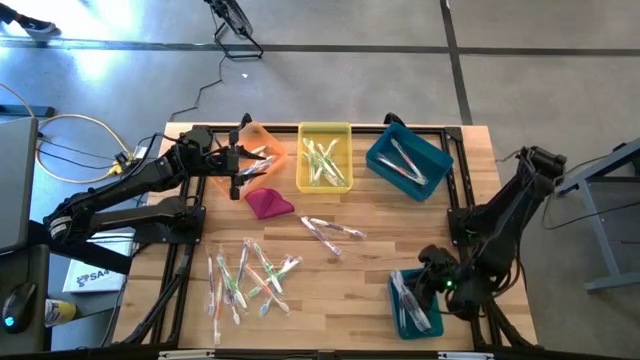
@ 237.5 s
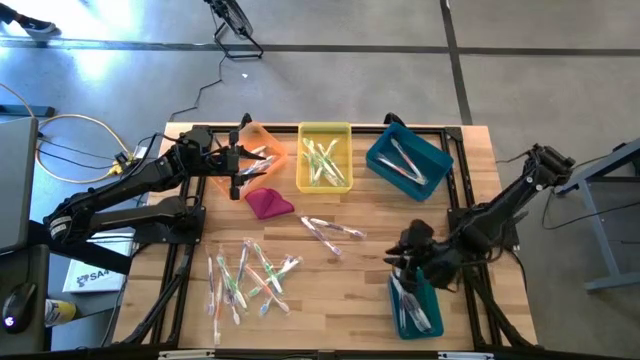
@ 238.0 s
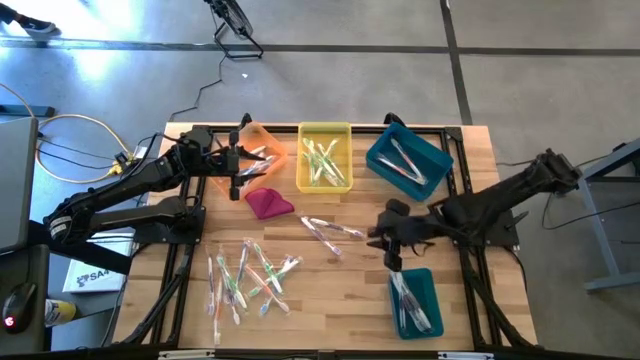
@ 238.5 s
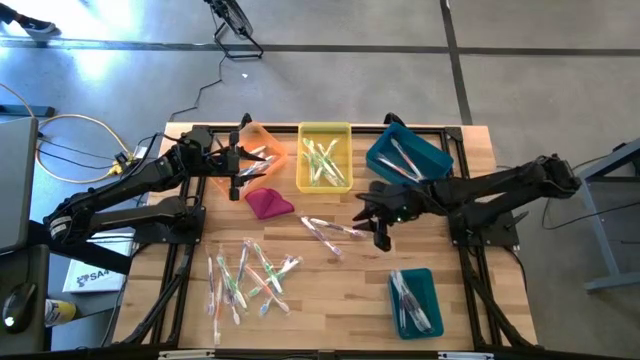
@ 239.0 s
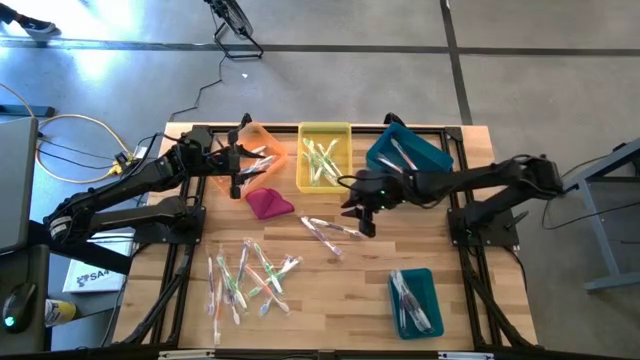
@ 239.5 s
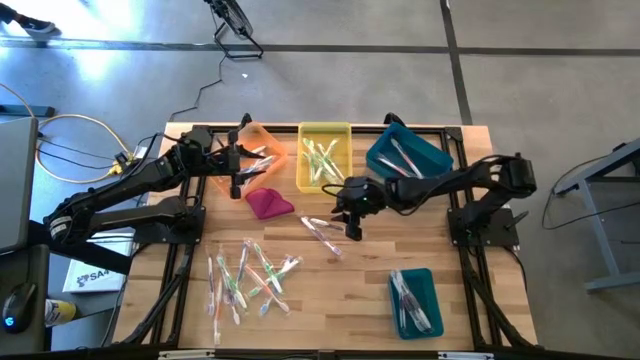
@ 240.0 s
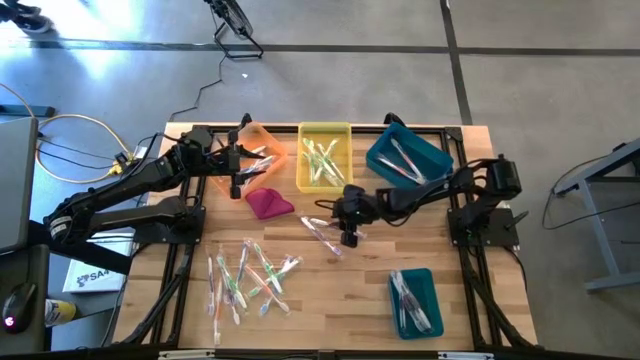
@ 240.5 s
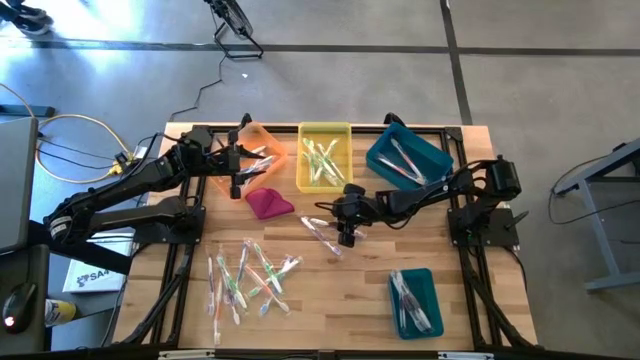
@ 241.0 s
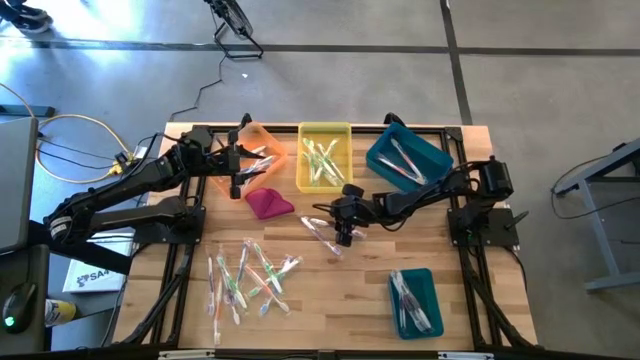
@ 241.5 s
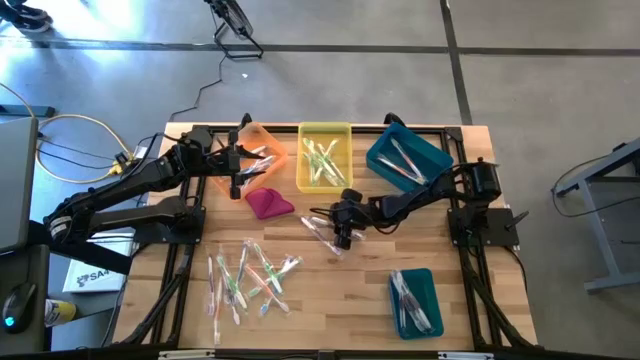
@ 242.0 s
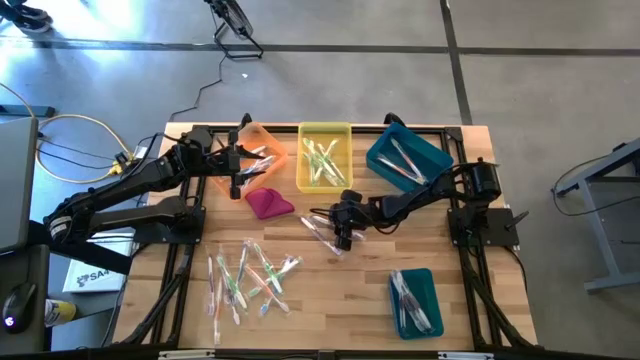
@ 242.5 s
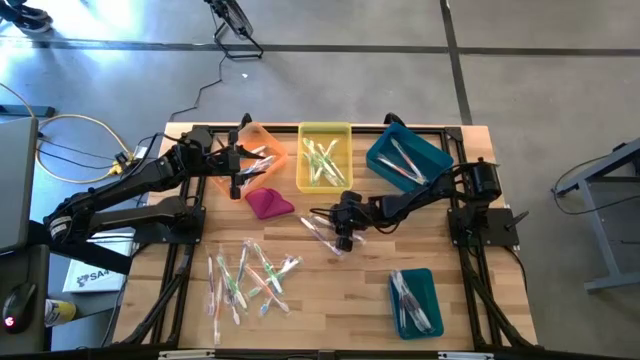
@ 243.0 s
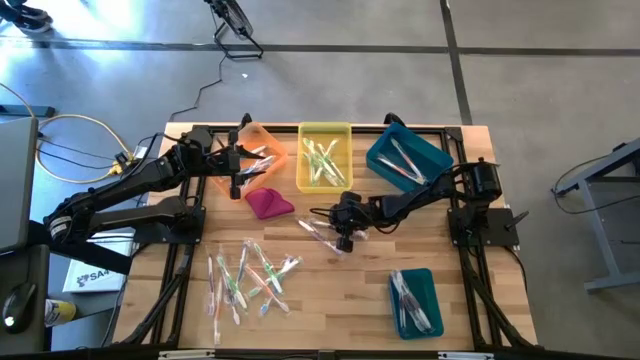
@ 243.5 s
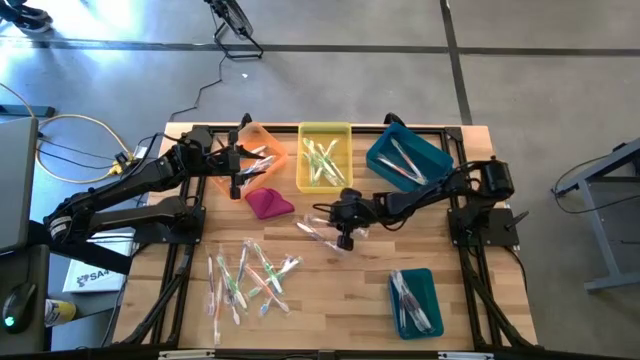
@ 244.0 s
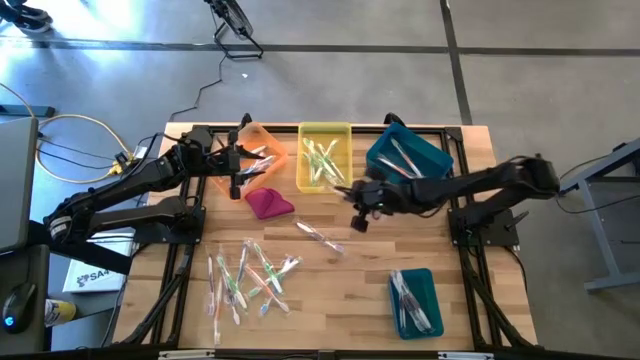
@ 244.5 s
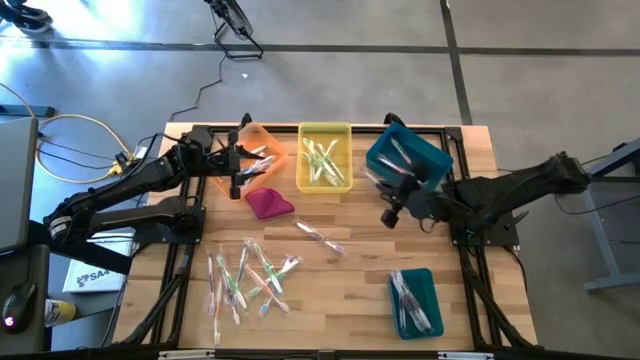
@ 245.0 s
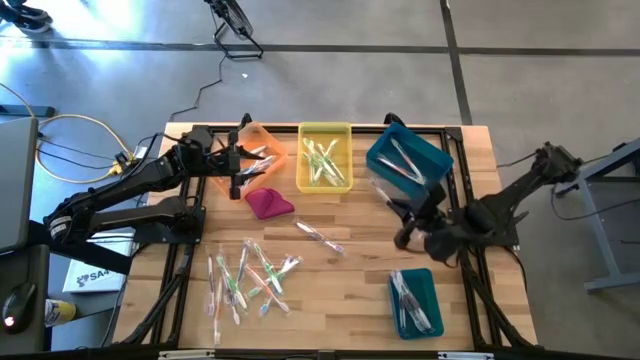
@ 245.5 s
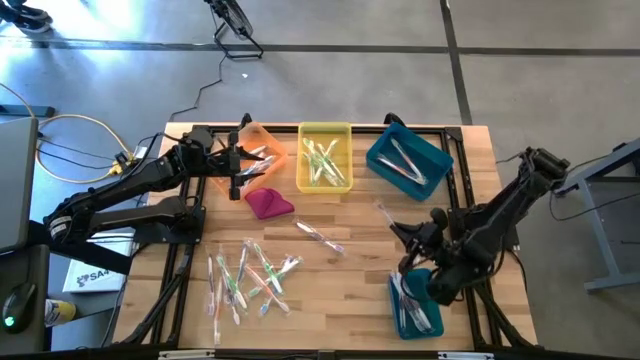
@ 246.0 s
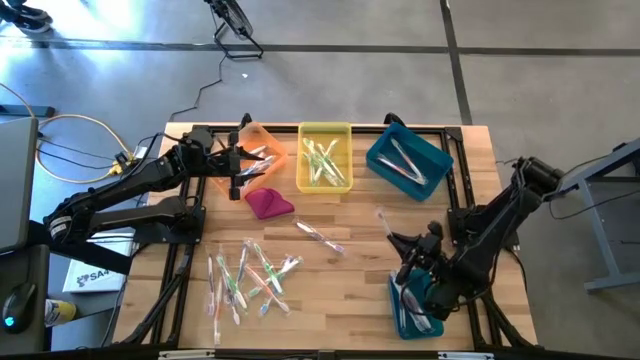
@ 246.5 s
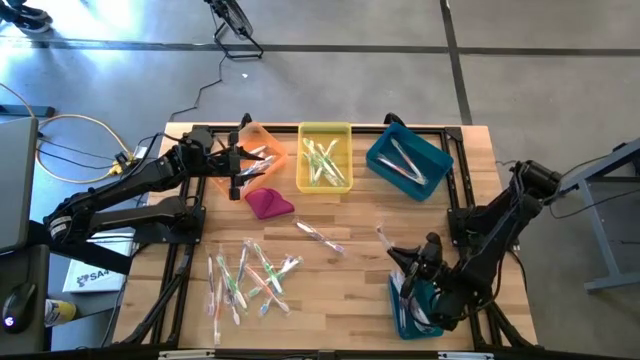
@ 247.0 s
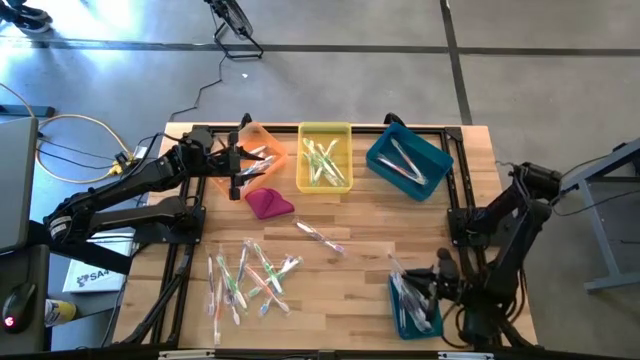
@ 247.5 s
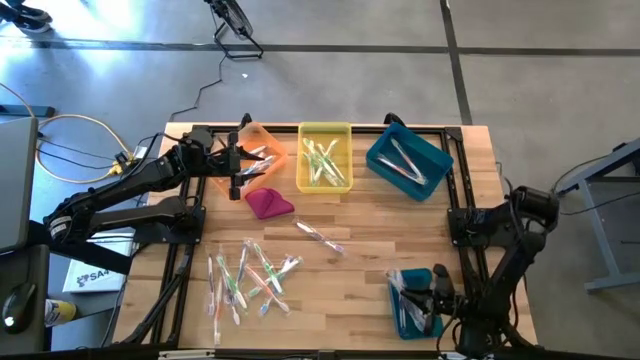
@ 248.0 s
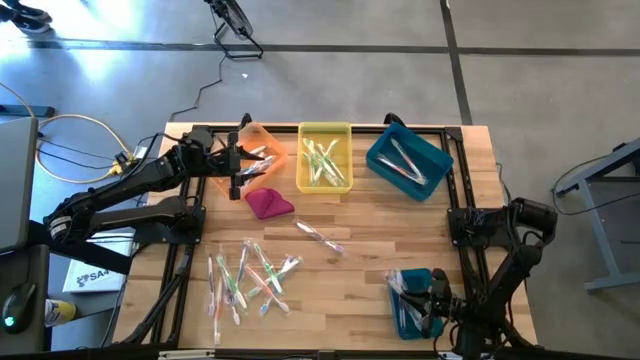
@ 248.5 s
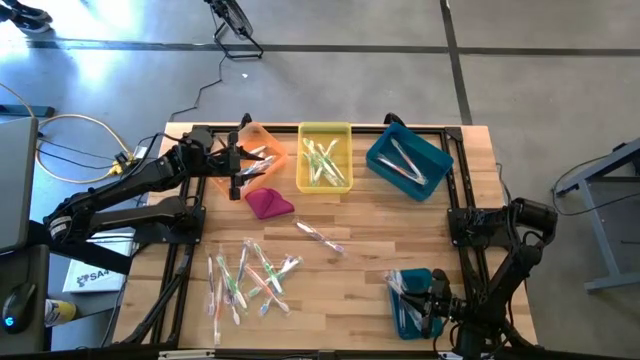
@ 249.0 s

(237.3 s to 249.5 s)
Task: Pick & Place Toothbrushes
Put the purple toothbrush into the bottom blue bin

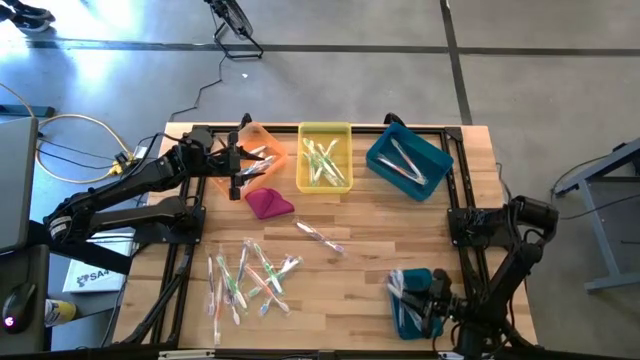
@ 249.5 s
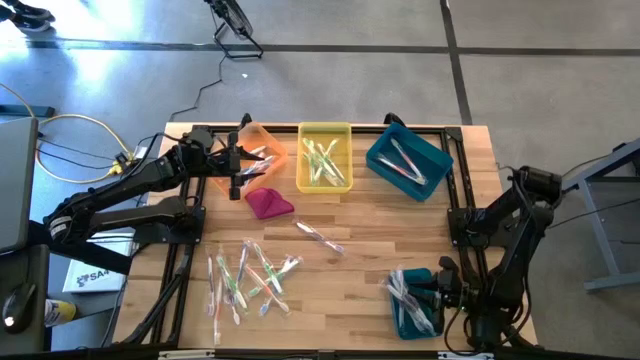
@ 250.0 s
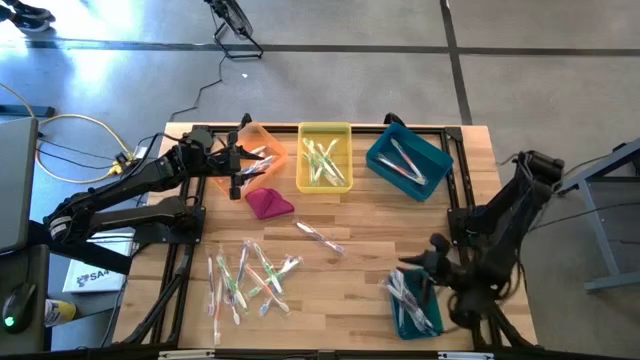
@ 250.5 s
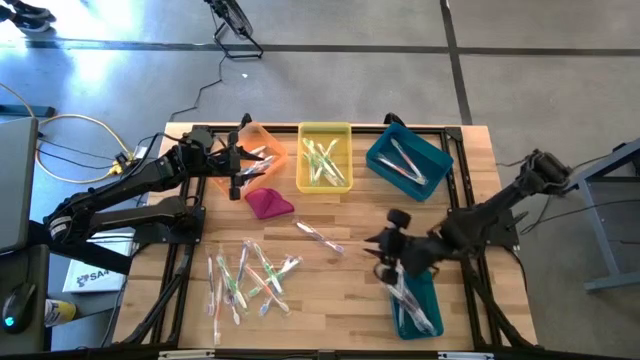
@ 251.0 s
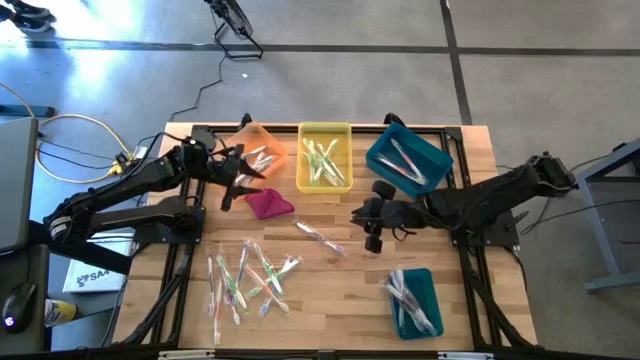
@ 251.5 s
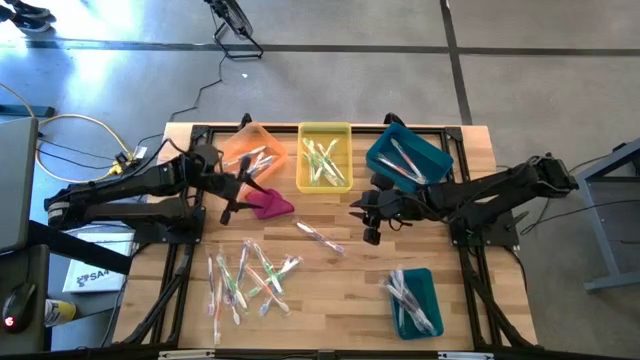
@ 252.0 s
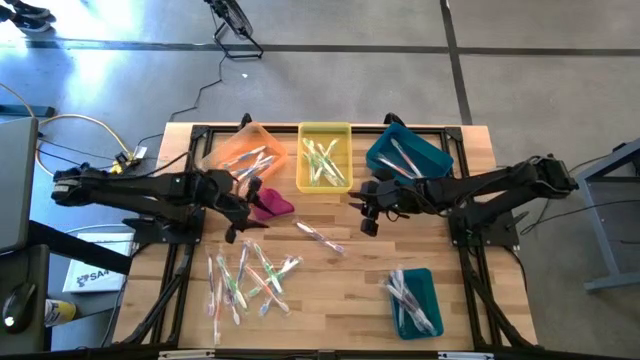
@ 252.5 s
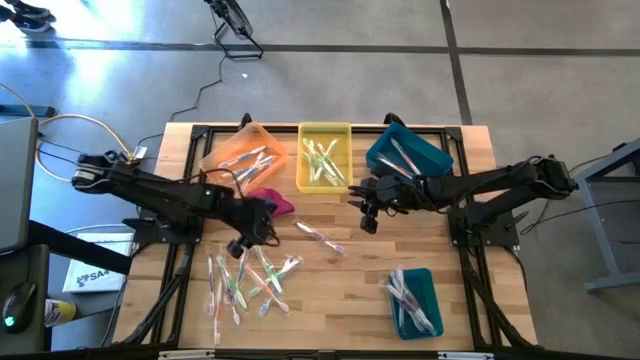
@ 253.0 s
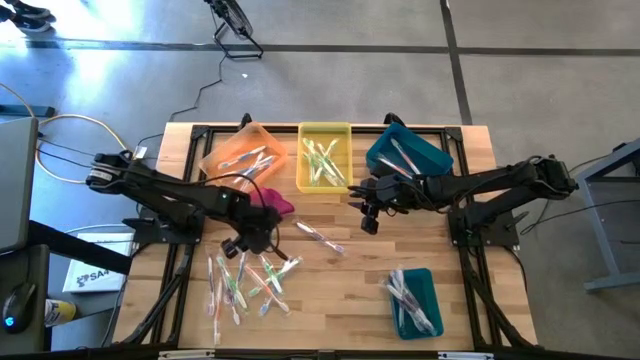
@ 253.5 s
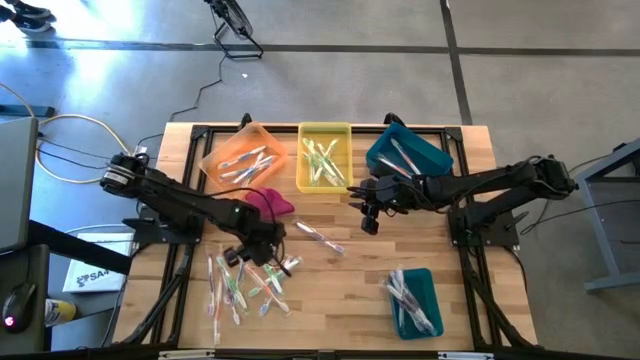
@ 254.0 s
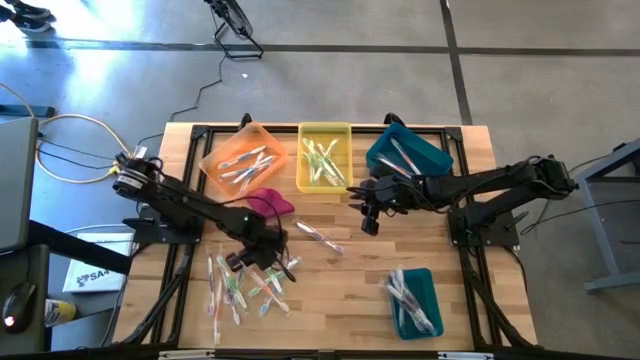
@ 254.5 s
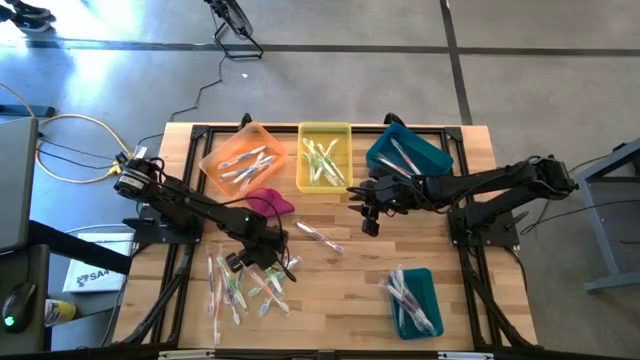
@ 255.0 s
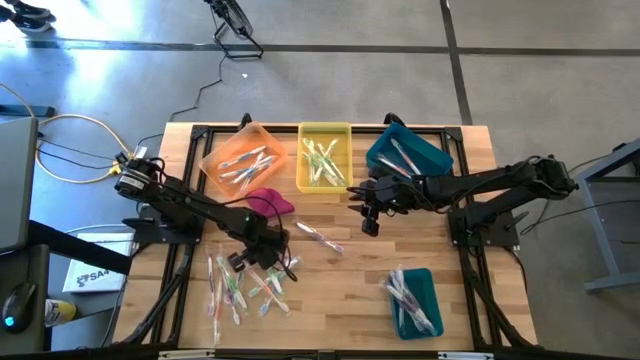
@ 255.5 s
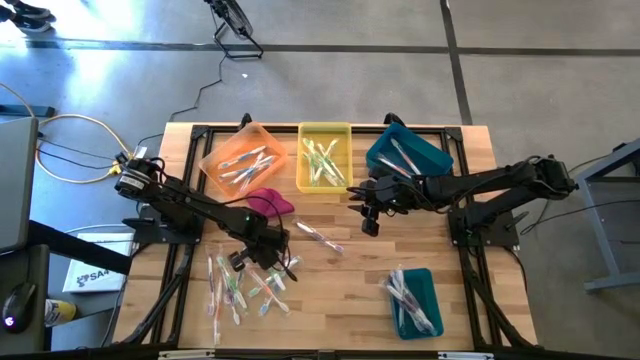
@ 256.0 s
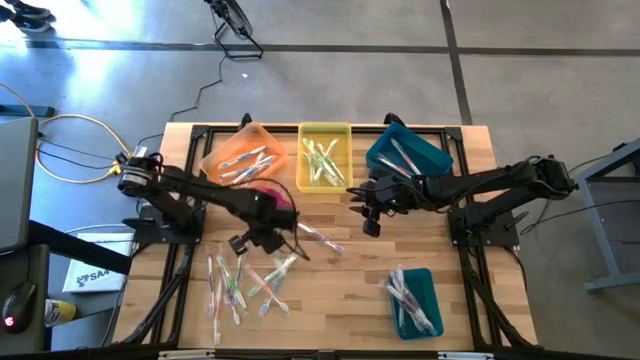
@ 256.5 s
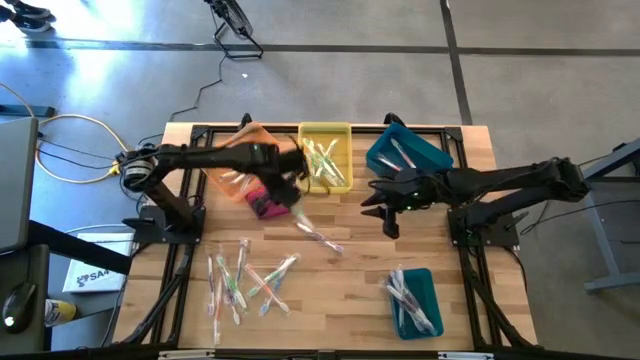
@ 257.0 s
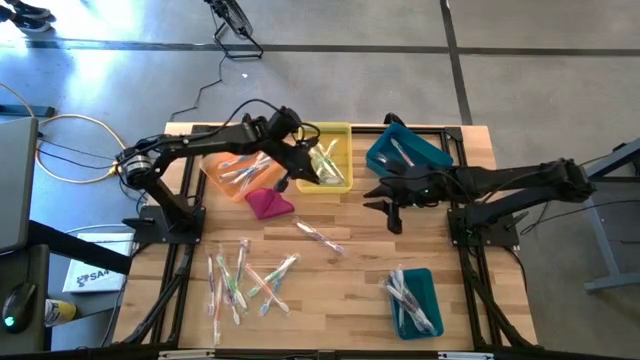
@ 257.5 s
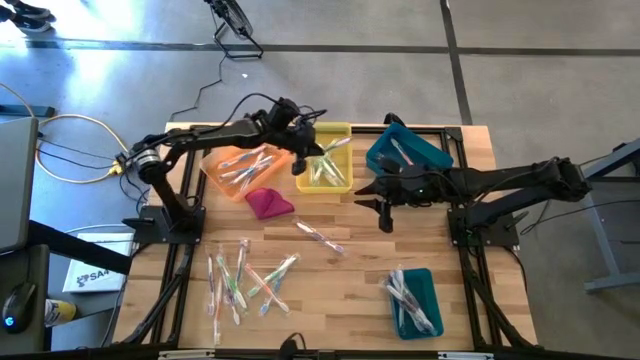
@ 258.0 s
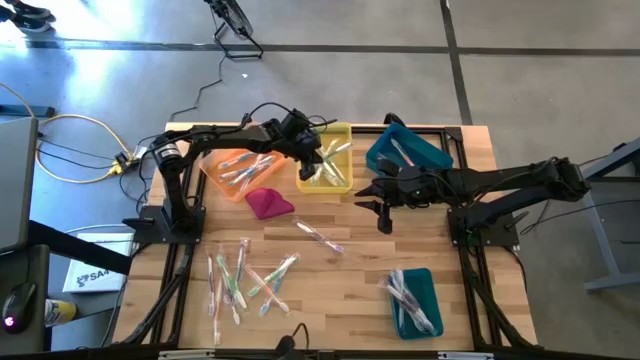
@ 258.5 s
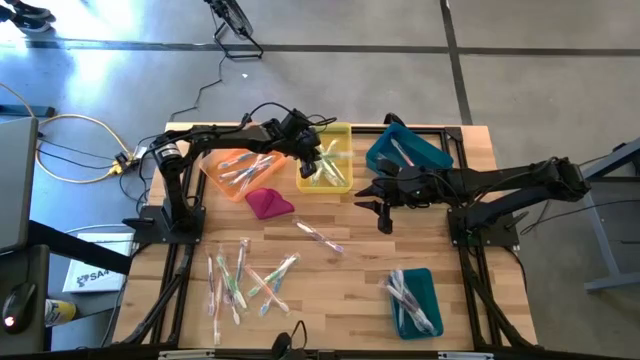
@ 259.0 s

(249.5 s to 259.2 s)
Put the green toothbrush into the yellow bin
